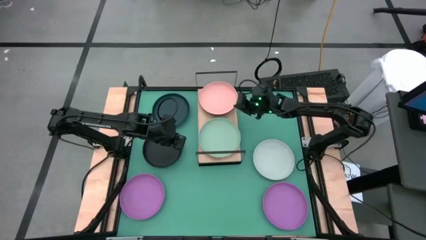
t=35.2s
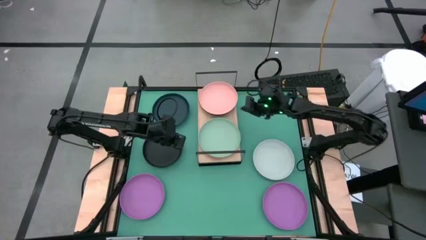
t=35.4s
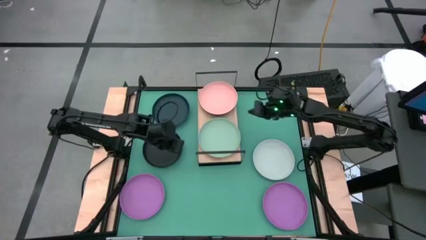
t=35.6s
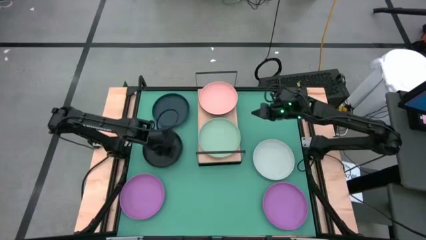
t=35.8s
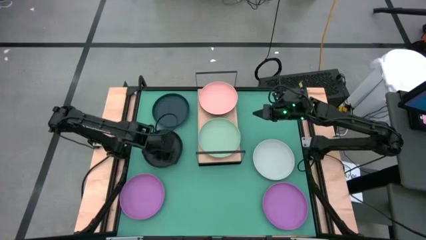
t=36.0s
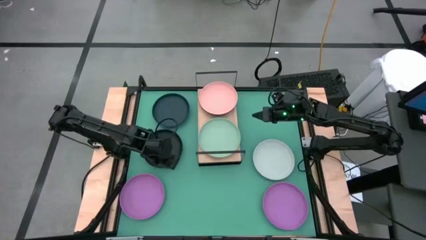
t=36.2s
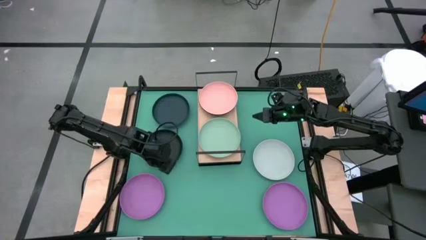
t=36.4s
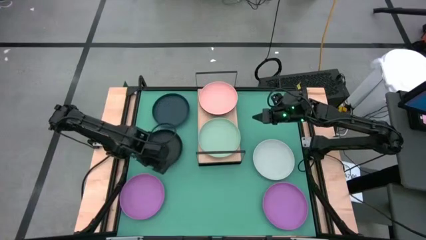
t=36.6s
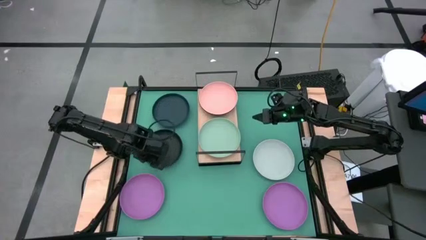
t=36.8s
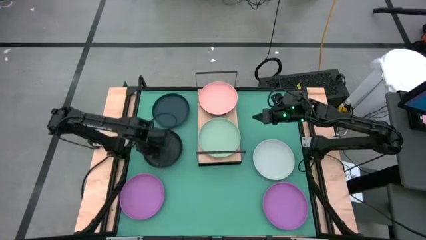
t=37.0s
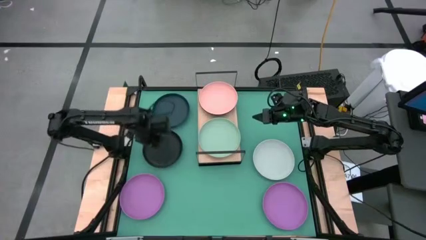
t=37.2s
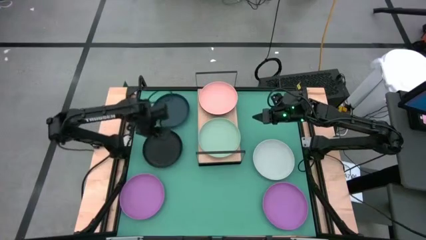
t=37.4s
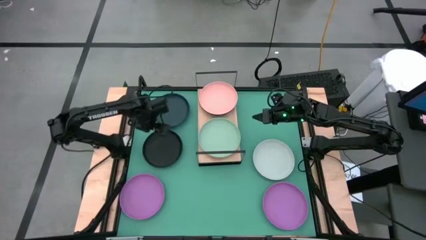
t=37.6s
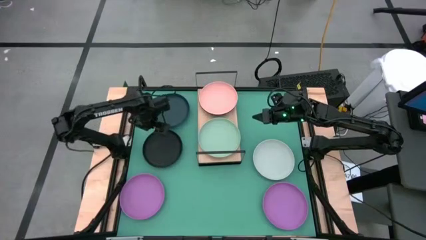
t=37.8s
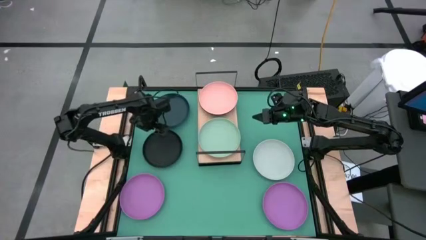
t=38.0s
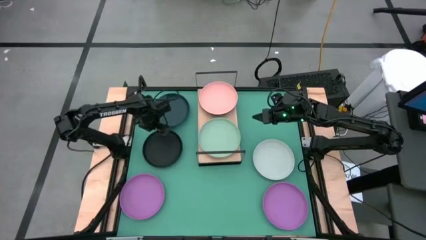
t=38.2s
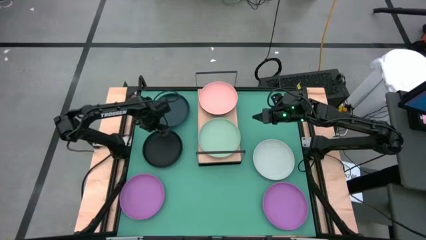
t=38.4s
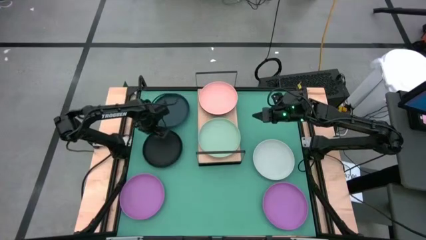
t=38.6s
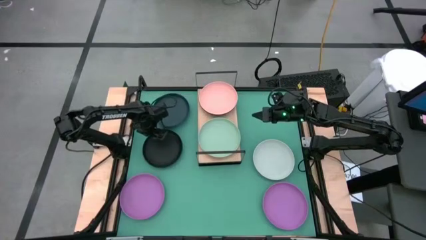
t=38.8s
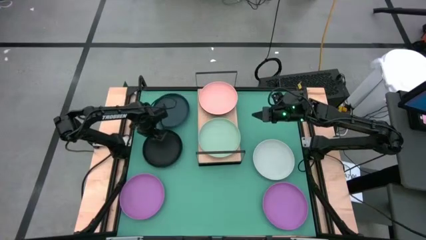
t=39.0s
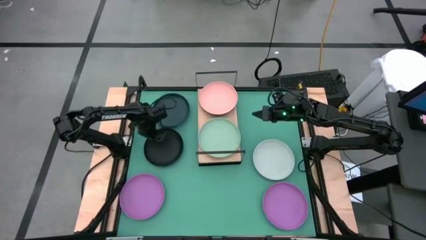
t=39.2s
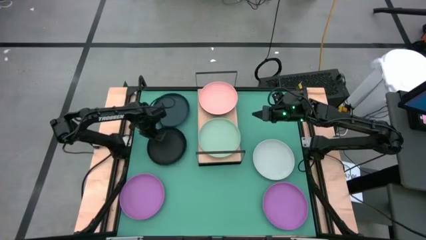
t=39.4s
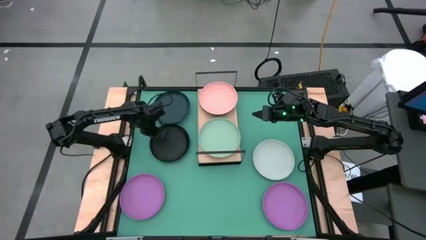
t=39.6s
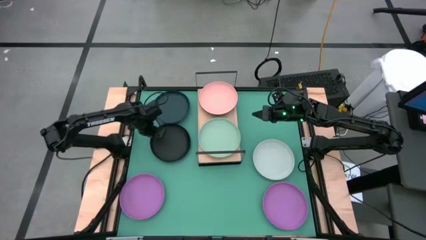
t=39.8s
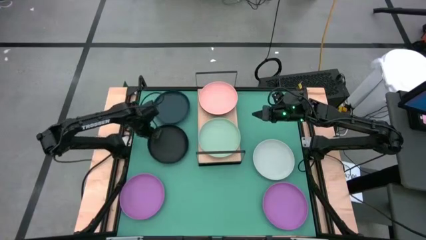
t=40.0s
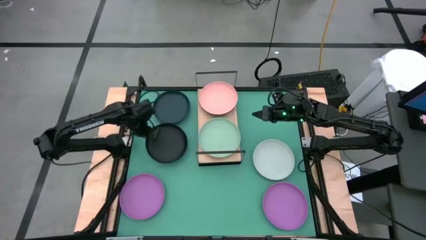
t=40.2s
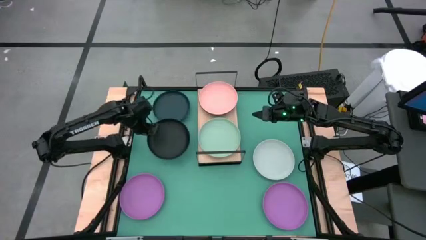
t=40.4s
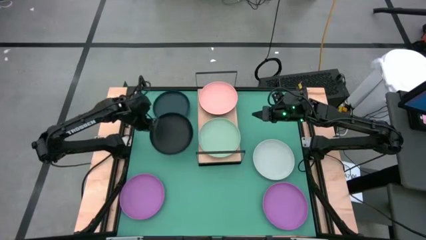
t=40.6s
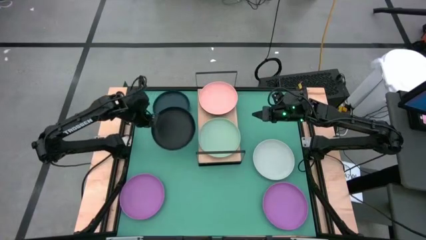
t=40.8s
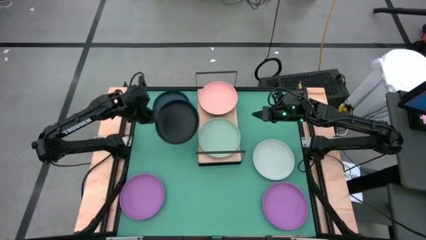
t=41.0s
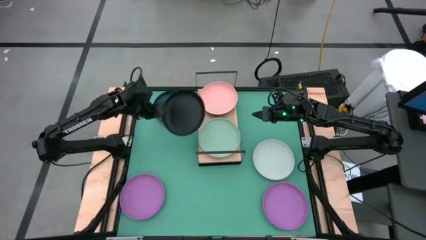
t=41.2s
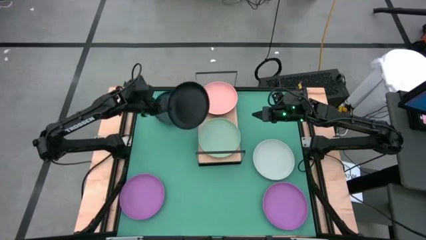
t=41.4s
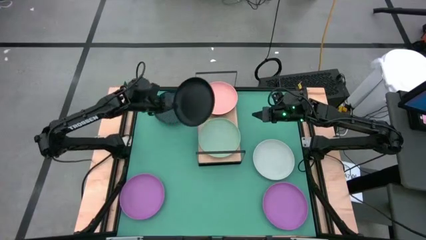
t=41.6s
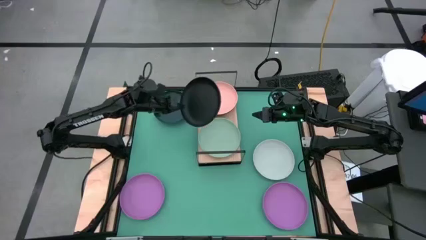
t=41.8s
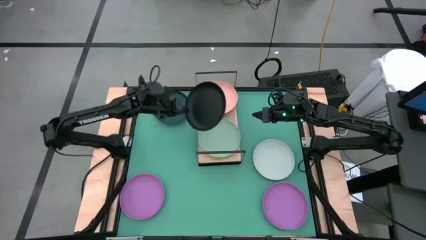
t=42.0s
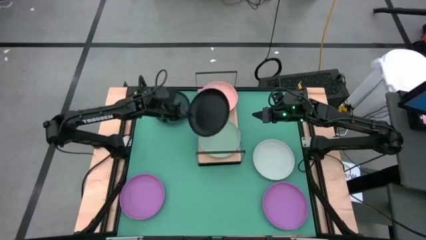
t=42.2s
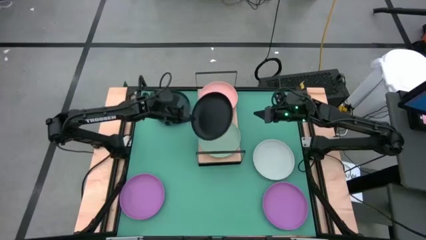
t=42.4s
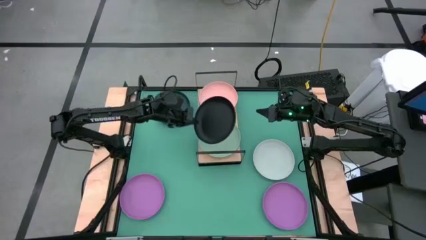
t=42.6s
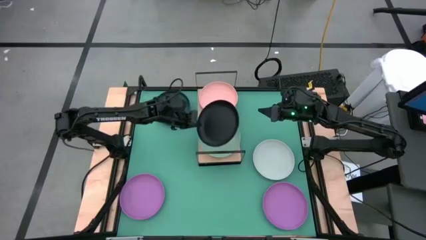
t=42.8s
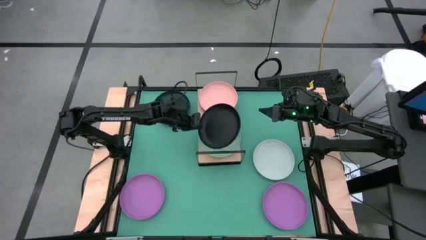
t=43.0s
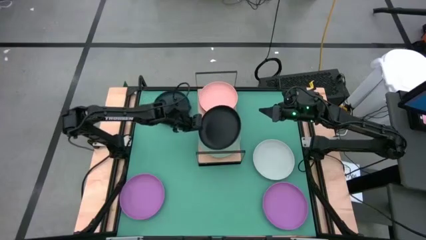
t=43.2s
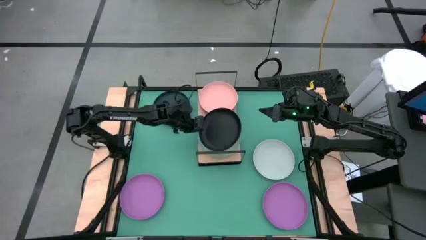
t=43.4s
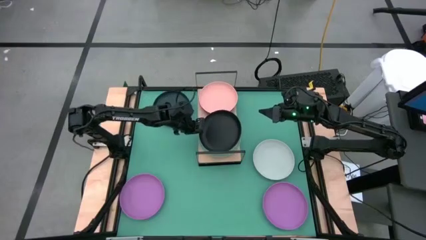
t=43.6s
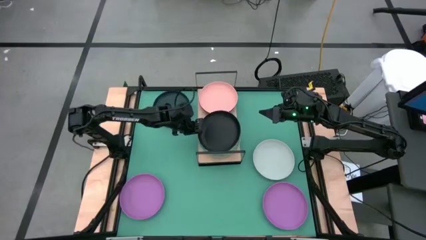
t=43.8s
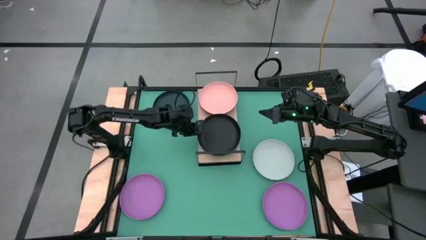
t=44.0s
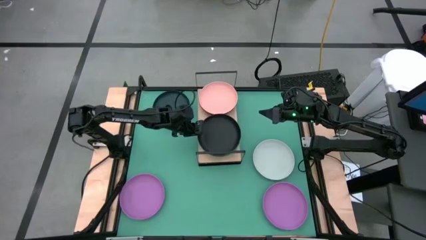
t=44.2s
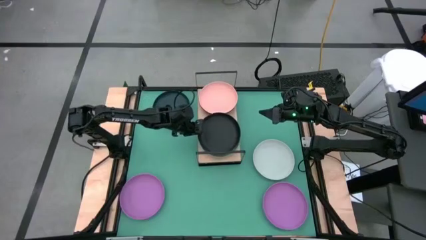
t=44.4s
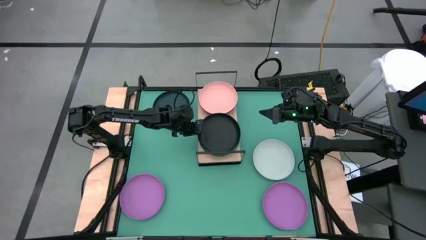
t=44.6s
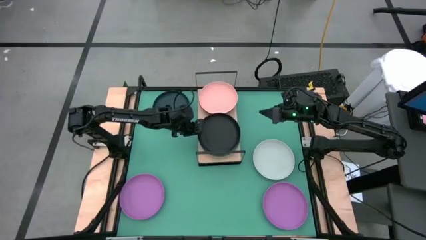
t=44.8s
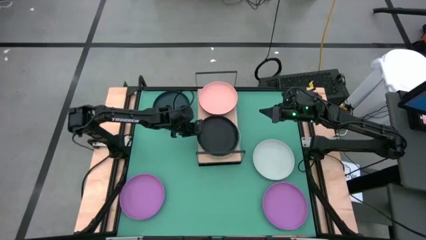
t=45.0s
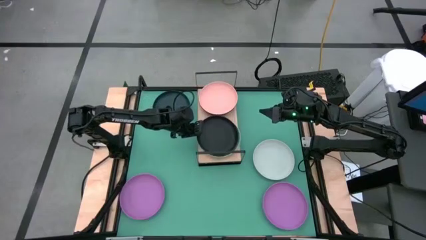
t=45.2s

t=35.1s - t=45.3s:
Task: Place and stack plates onto a shelf
Stack the middle black plate on top of the green plate on the shelf
